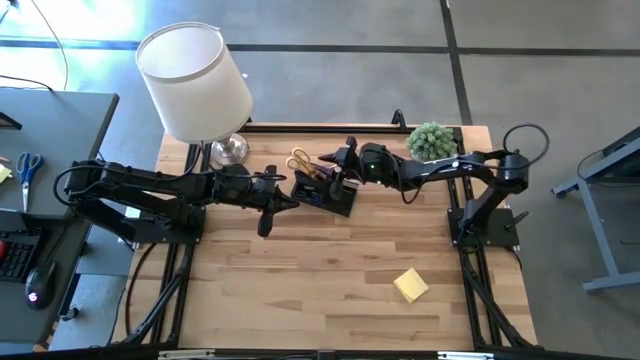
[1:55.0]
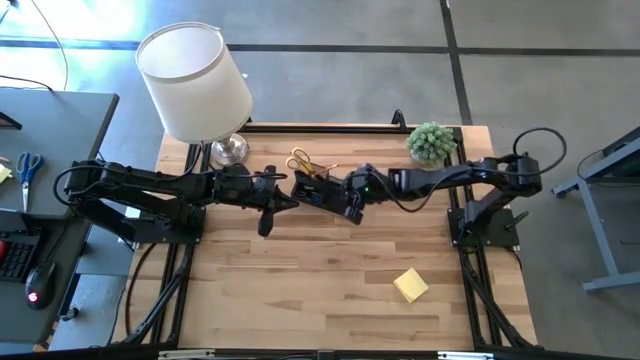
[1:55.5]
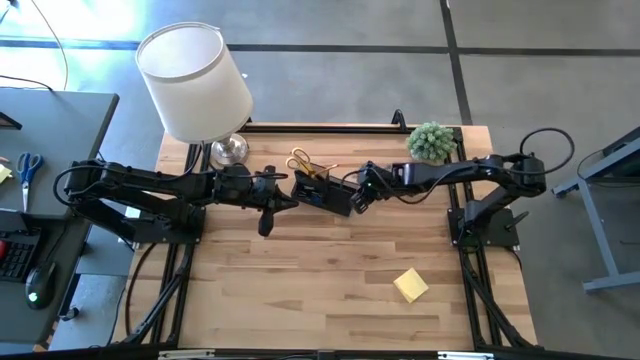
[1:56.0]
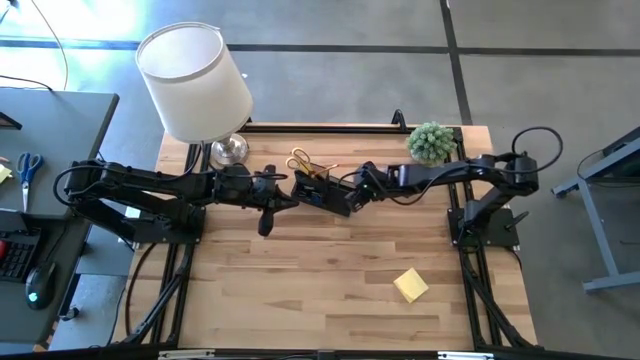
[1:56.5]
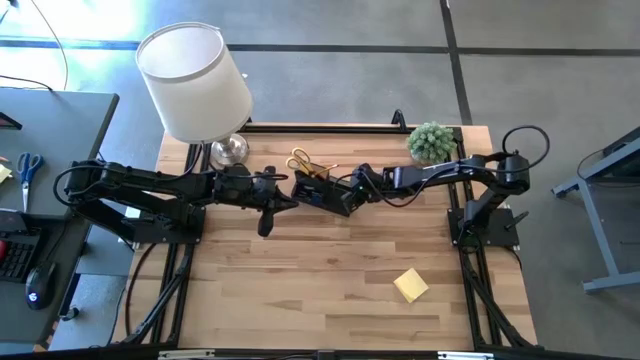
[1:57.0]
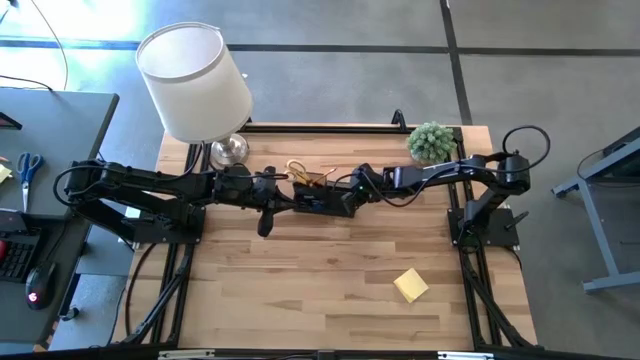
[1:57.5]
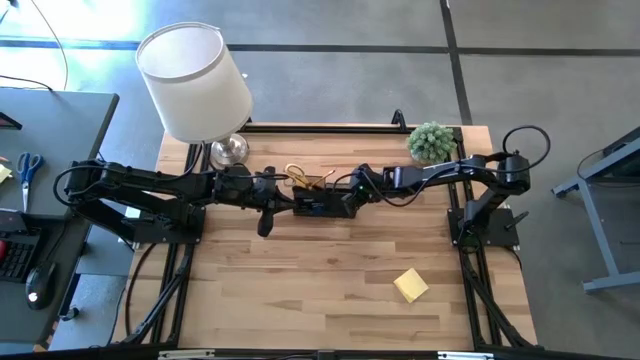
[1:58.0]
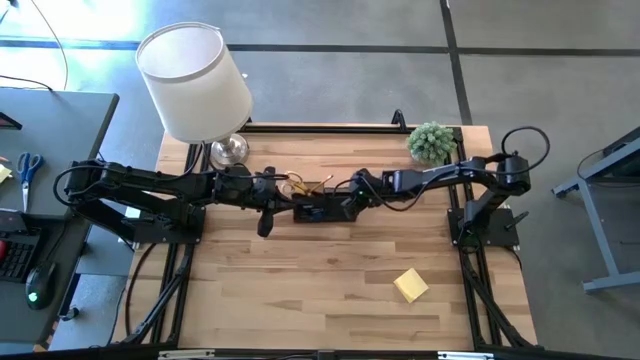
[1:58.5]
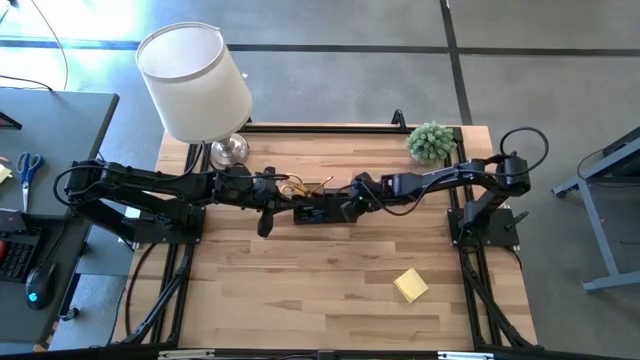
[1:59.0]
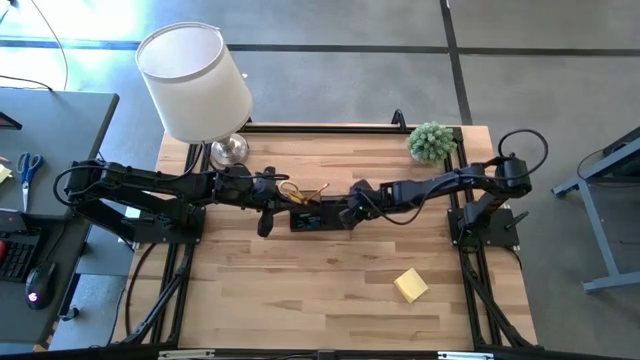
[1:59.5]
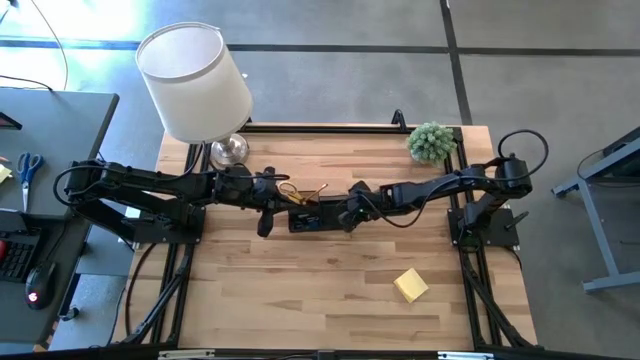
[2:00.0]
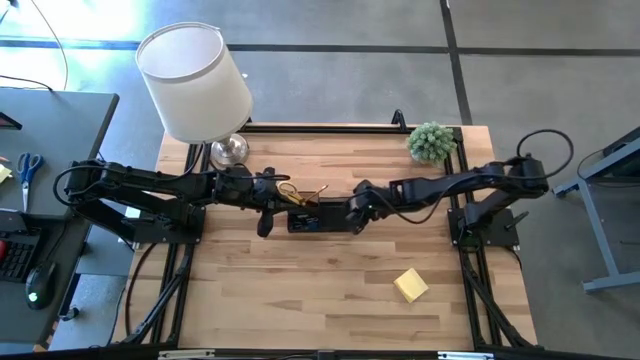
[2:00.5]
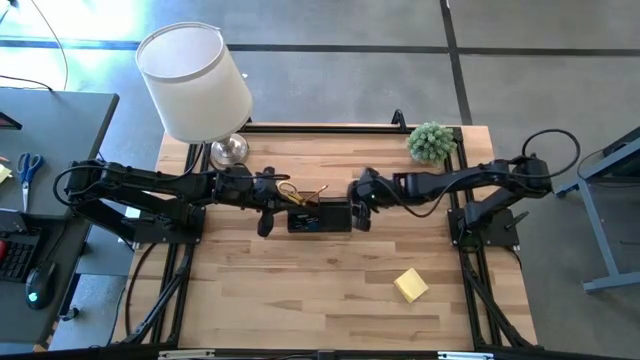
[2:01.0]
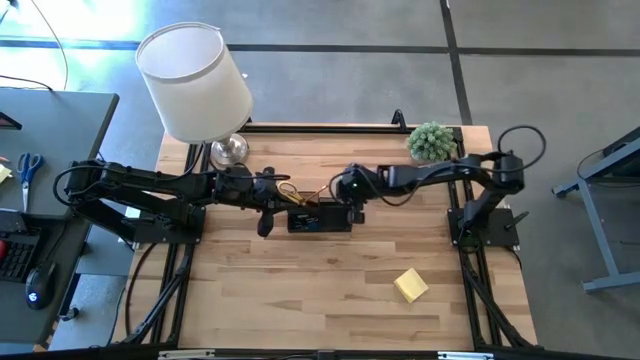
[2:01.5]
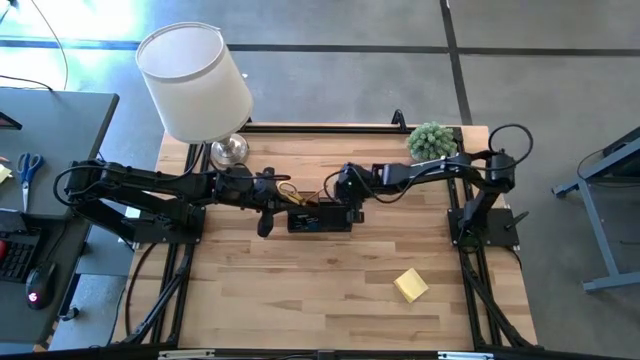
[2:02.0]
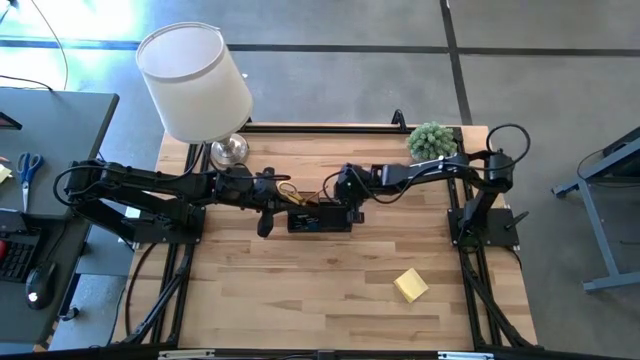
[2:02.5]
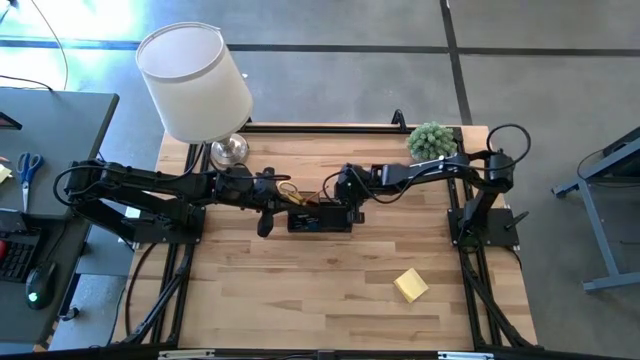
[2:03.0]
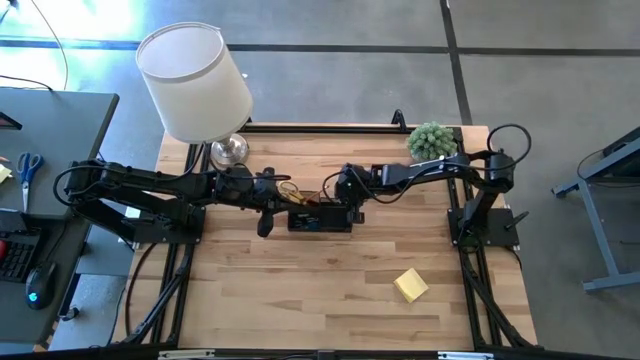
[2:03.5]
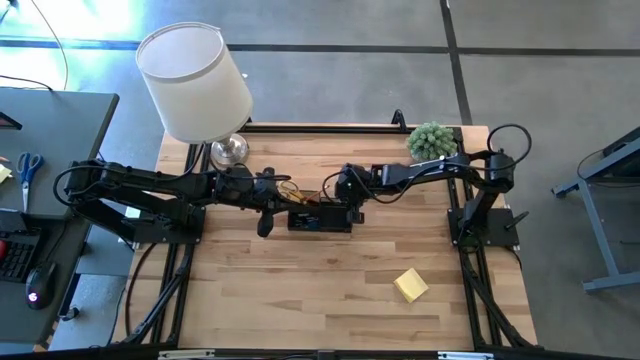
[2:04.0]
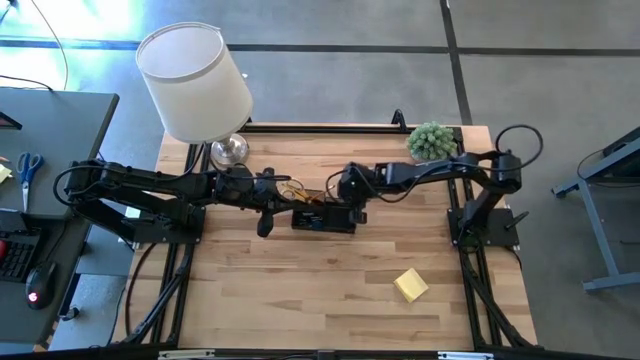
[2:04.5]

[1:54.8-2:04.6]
Task: Pick and place office supplies into organizer
Adjust the desk organizer

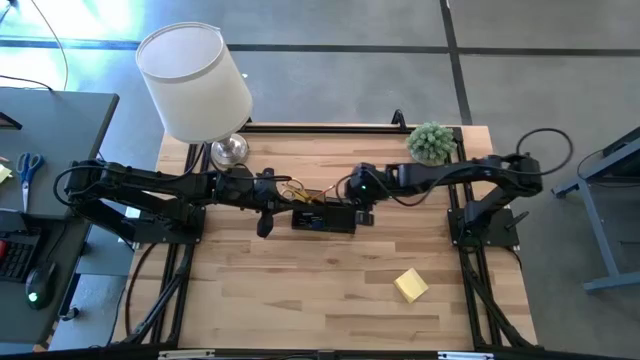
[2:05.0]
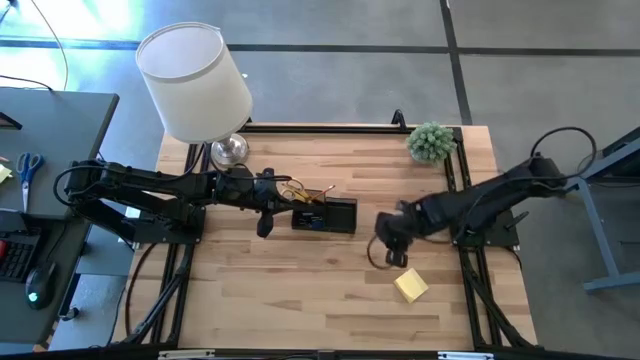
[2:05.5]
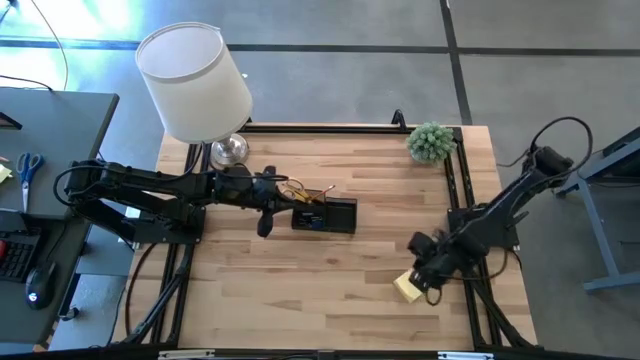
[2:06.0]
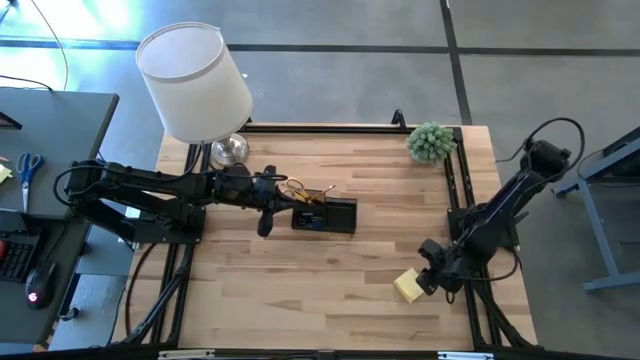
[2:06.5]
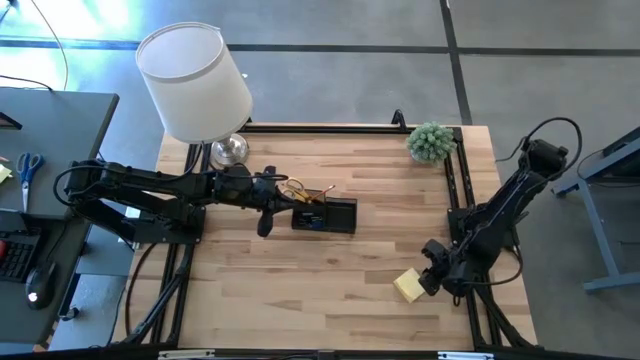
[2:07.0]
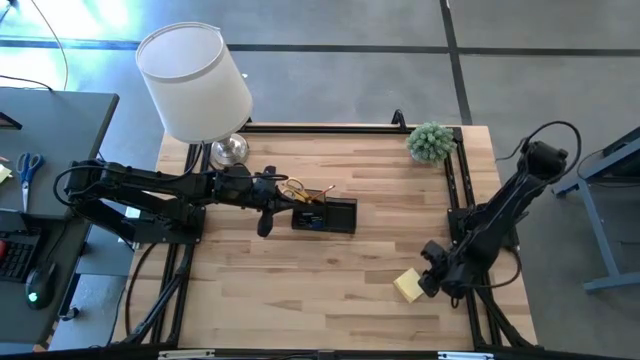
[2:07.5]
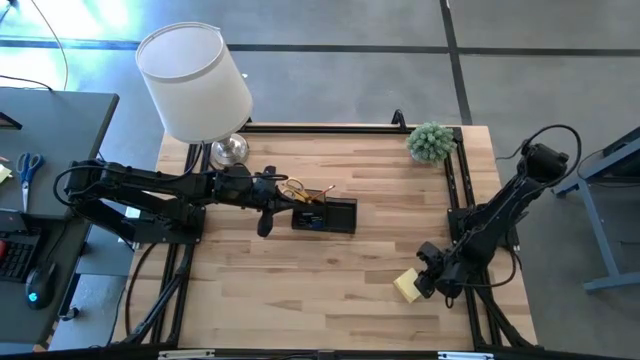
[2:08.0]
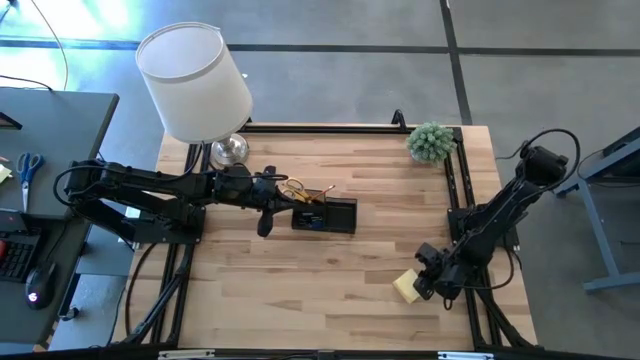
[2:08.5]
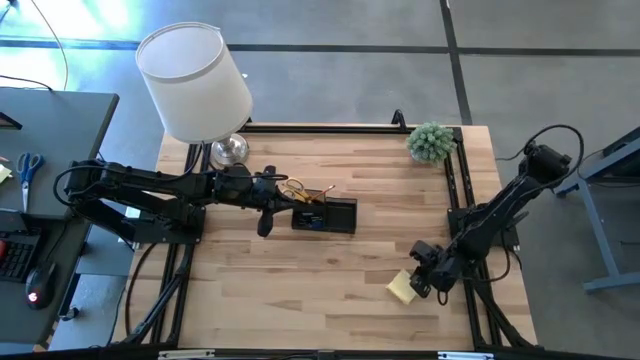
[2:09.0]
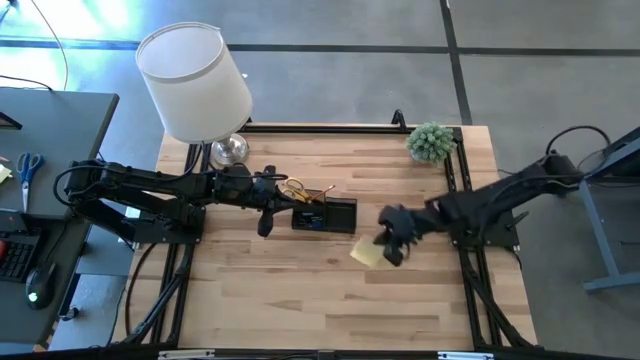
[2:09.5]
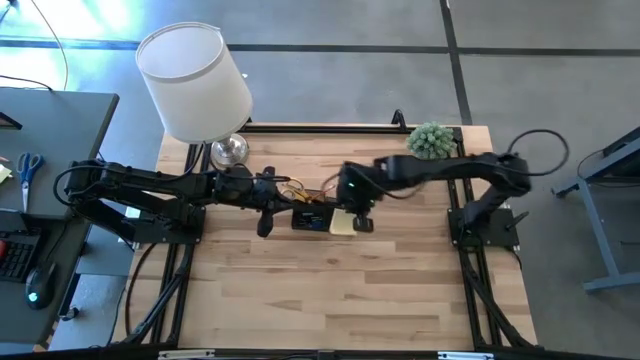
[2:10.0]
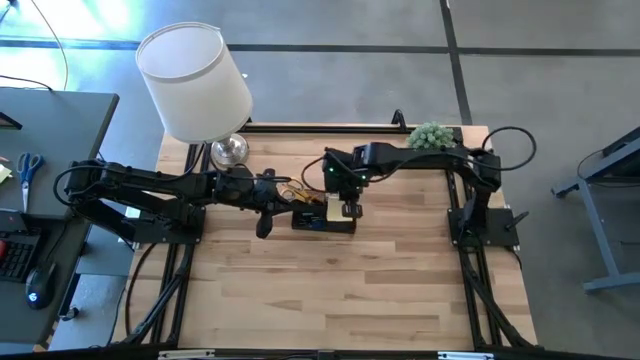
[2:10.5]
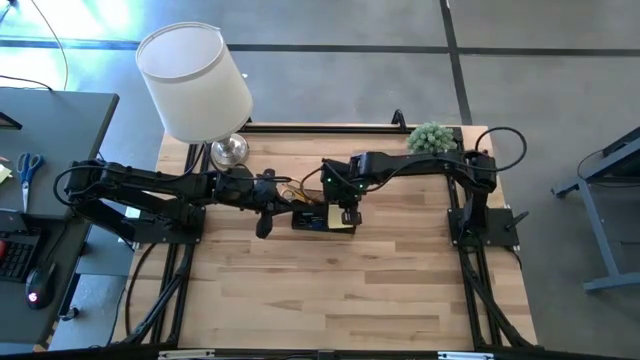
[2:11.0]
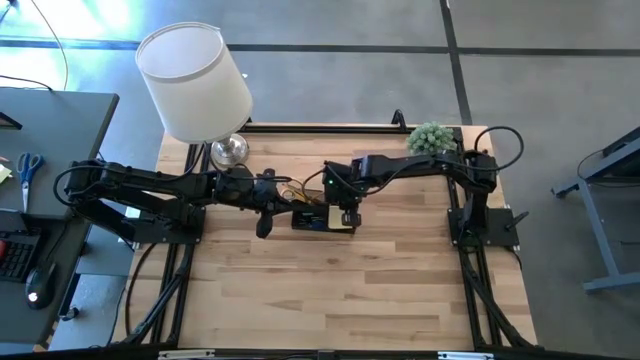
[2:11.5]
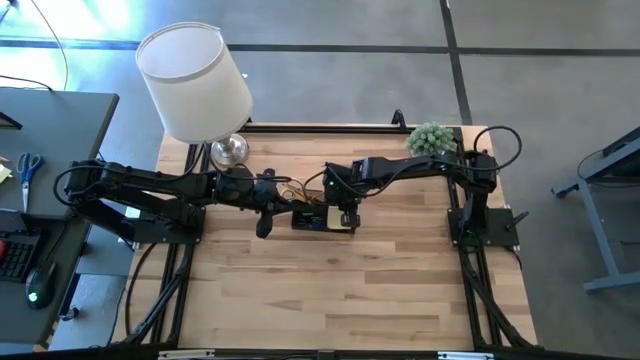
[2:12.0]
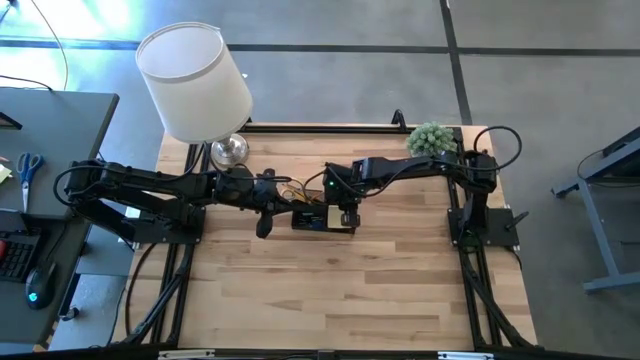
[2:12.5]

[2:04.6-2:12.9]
Put the yellow sticky notes into the desk organizer

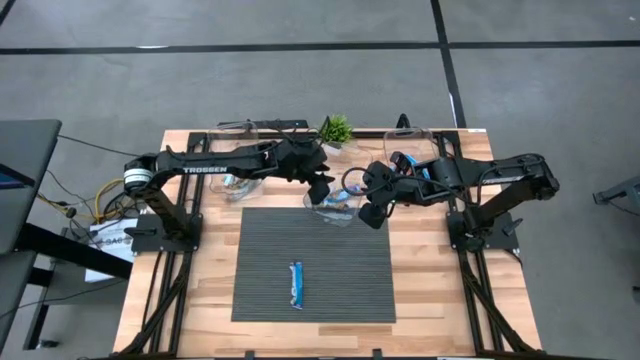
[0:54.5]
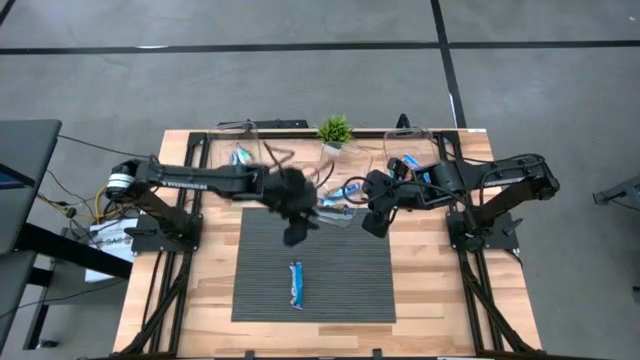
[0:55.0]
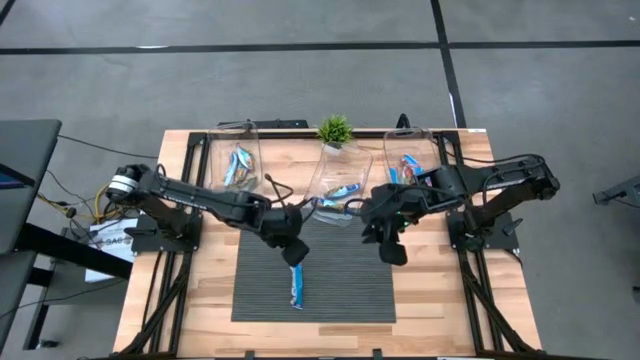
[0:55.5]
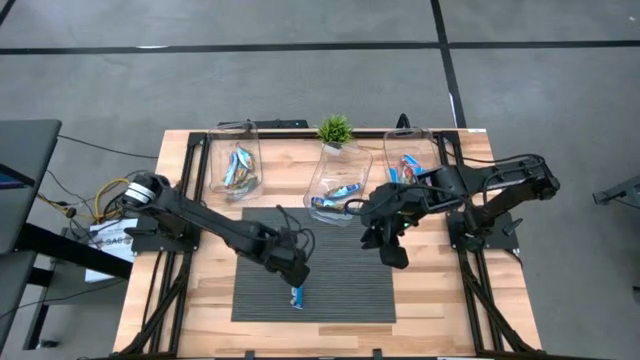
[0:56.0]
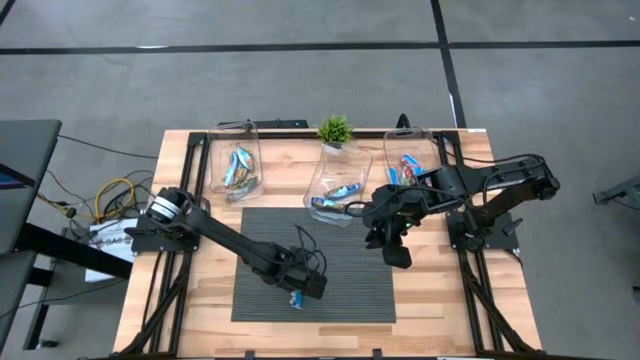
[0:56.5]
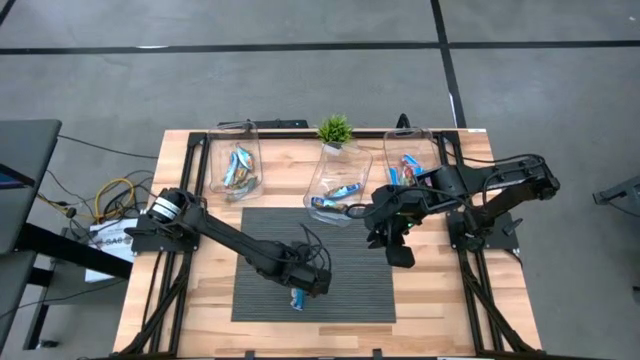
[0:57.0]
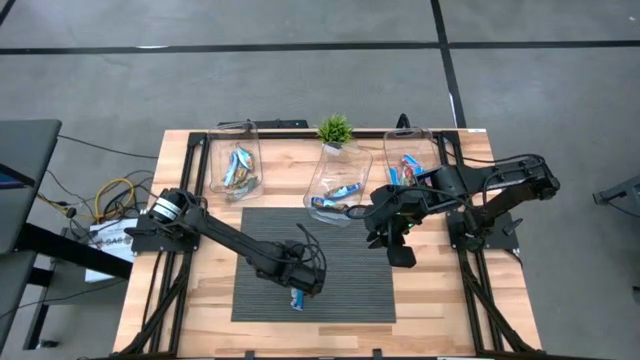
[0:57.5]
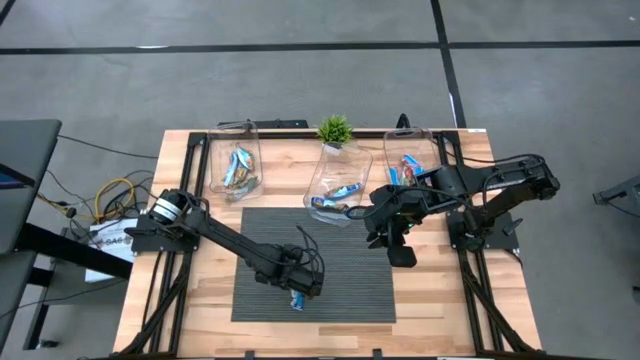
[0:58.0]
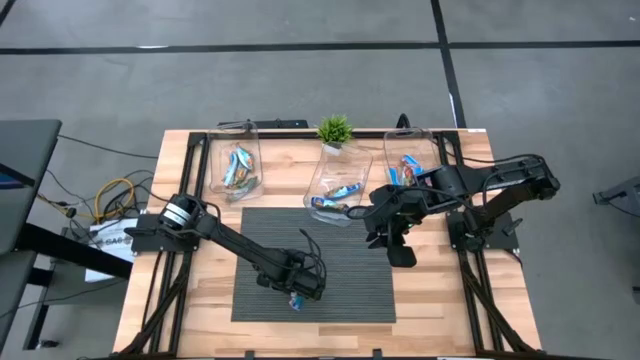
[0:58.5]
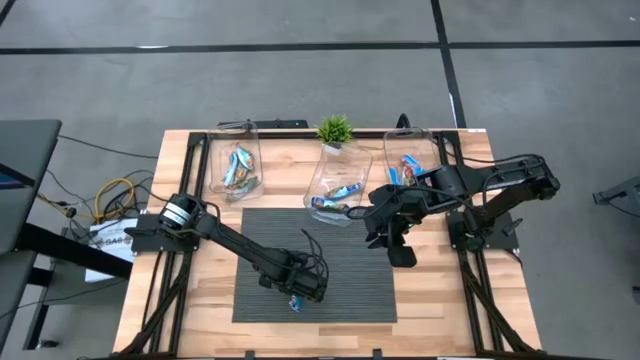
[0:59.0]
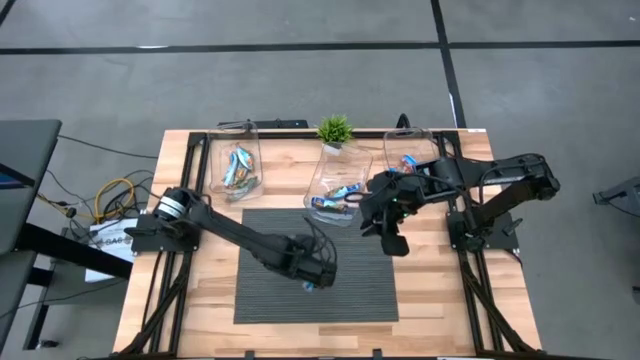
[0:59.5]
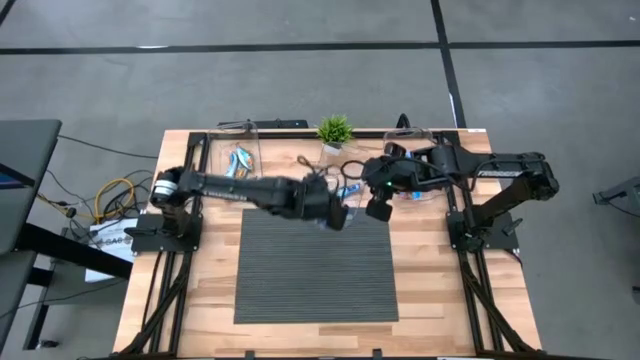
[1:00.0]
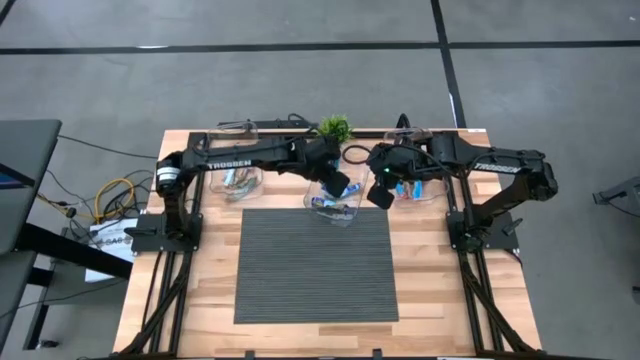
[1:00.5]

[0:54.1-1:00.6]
Task: Pick and place Granola Bars by type
Put the purple granola bar into the middle transparent bin
